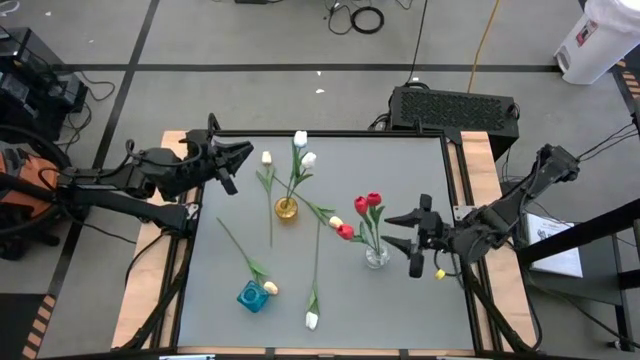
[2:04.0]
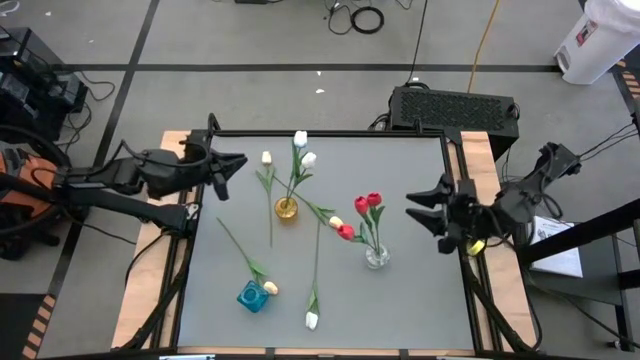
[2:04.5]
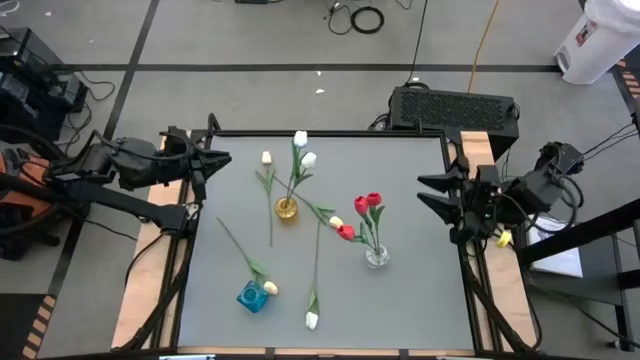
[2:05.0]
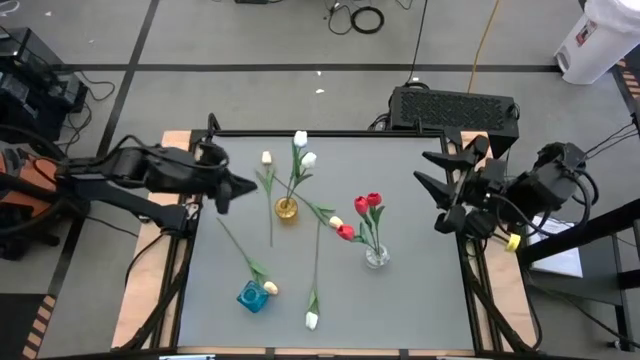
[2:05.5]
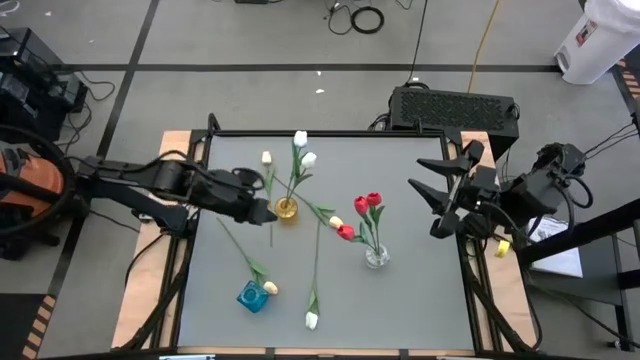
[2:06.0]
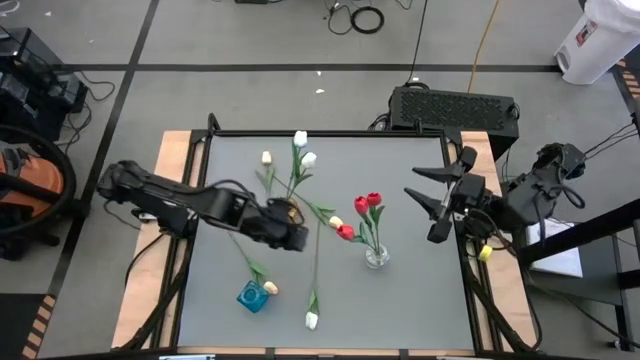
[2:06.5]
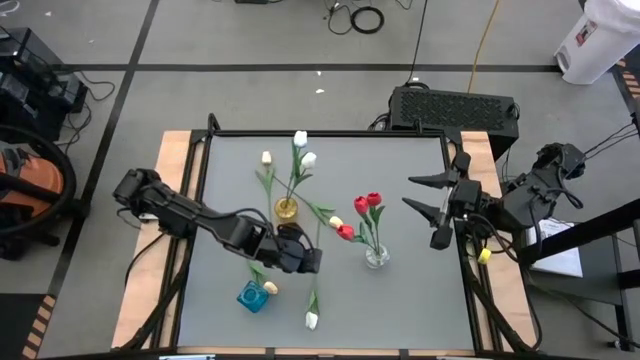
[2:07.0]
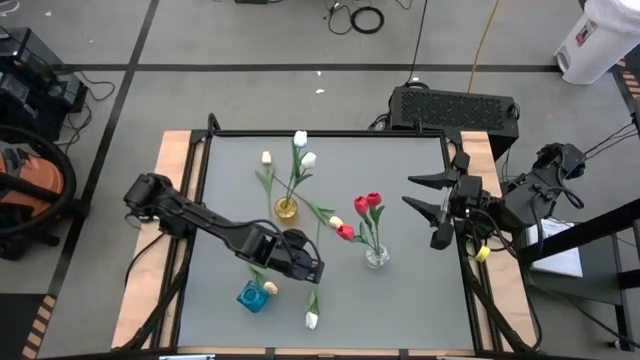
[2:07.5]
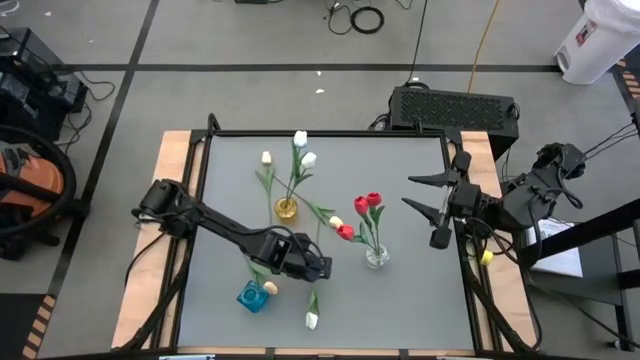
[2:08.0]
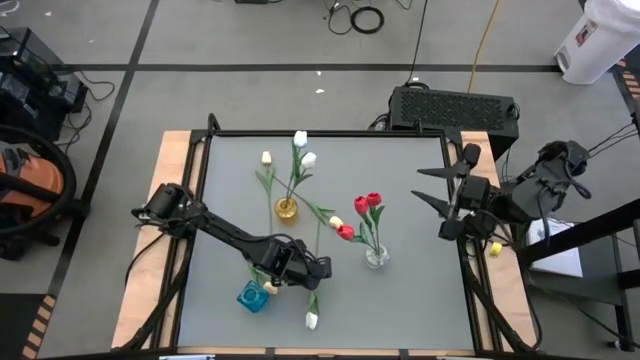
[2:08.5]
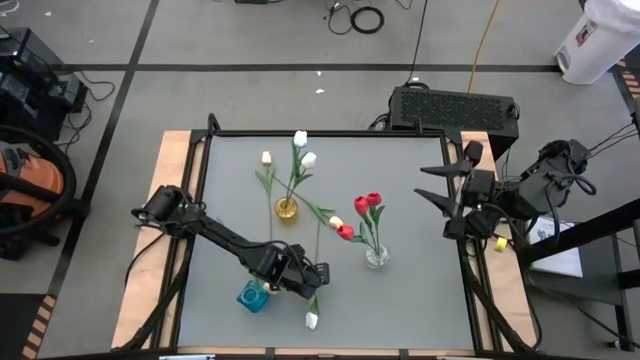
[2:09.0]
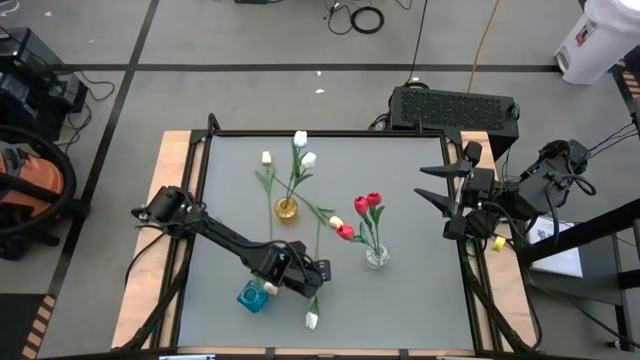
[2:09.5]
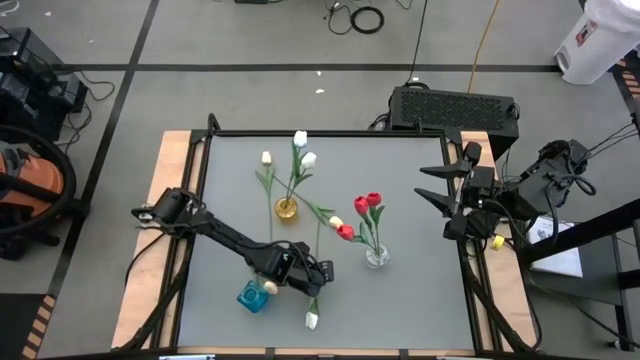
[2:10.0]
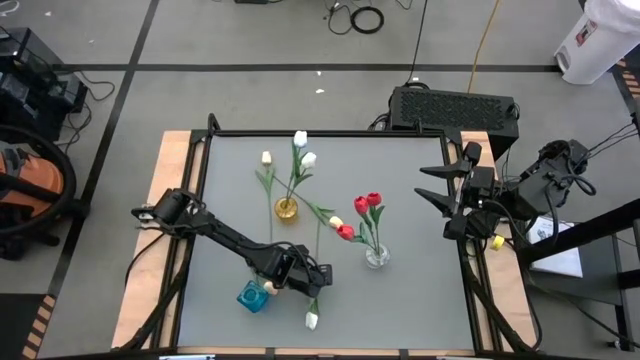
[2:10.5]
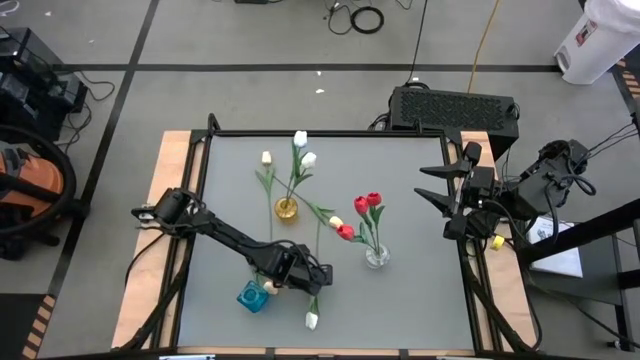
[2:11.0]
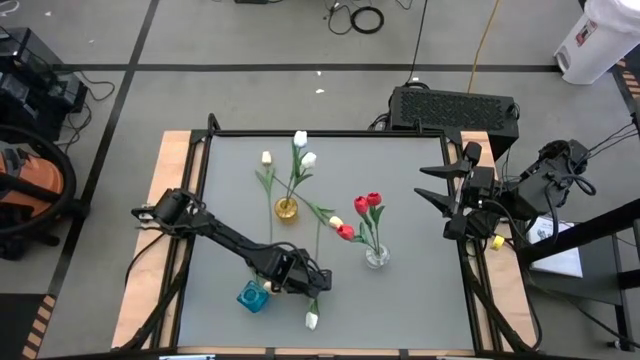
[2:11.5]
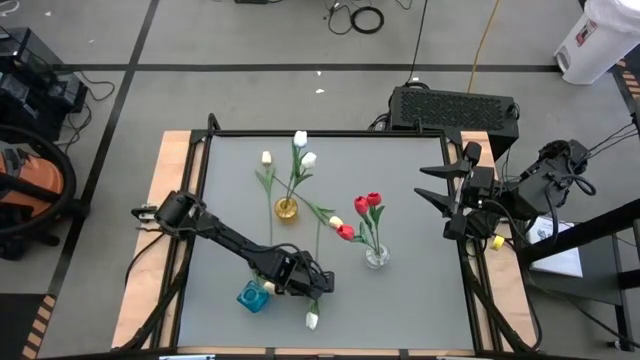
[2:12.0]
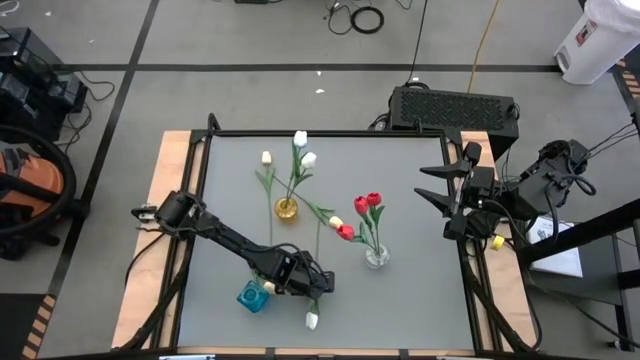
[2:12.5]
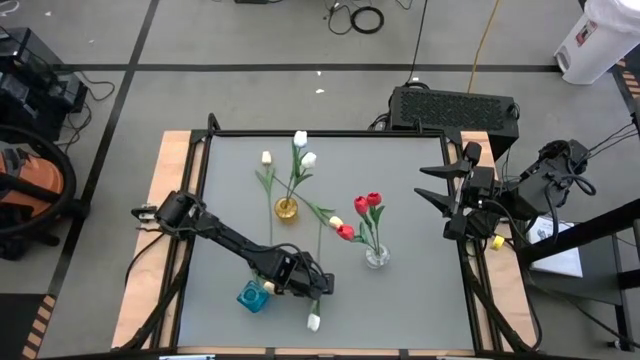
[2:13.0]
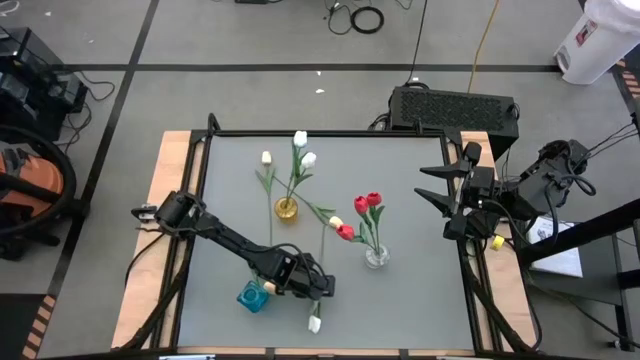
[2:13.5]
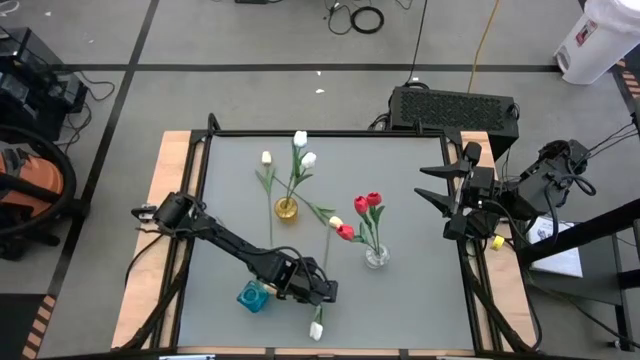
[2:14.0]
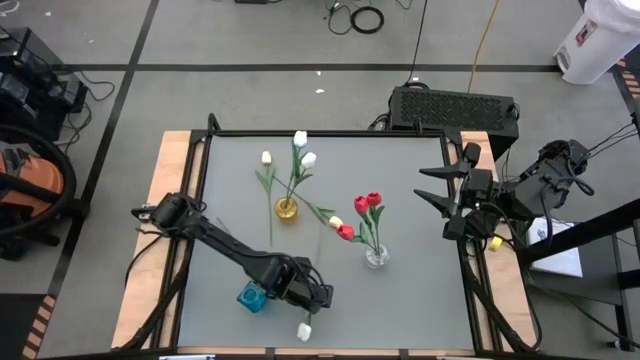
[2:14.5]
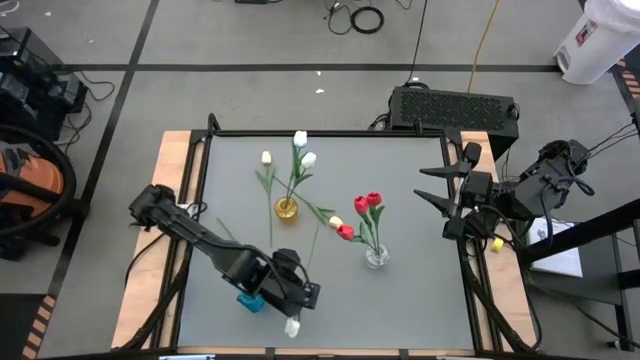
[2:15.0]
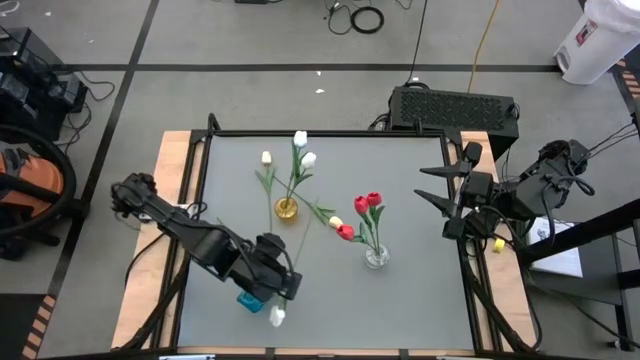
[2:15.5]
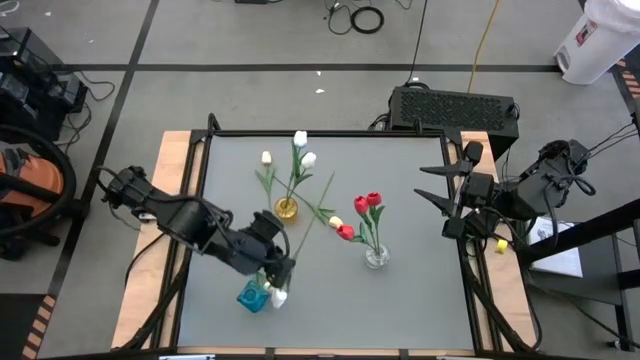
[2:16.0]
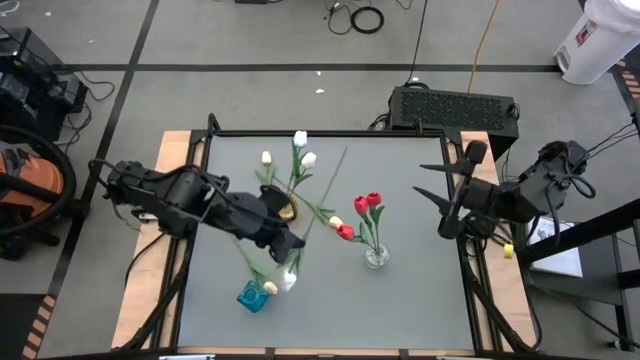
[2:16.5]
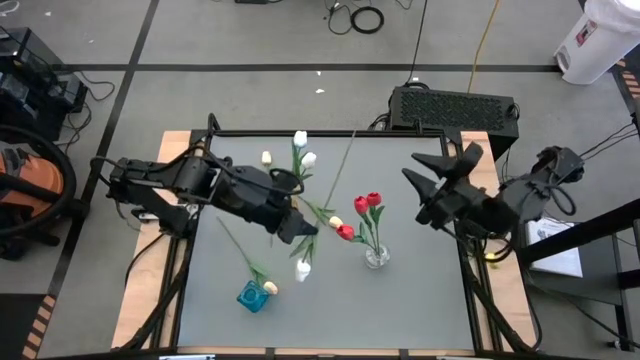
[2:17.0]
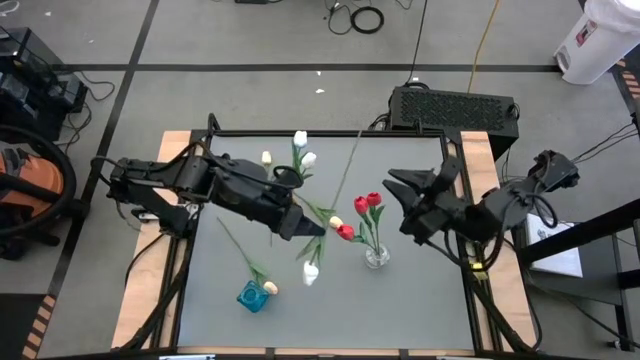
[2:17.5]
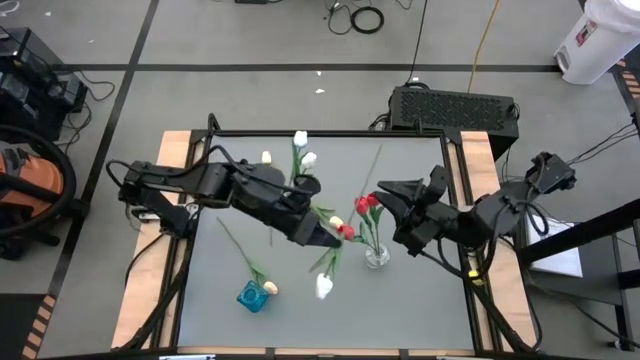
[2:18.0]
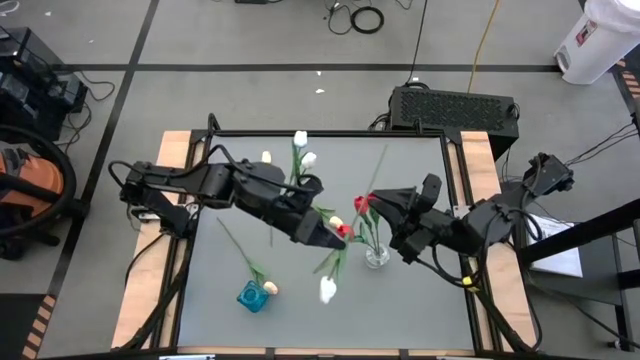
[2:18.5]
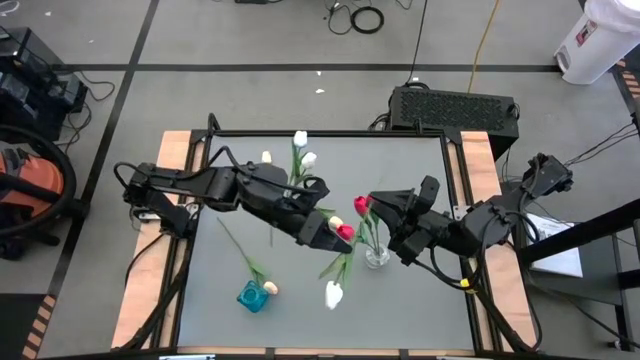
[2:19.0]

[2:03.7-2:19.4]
Task: Sort flowers into vase by color
Put the white tulip into the yellow vase

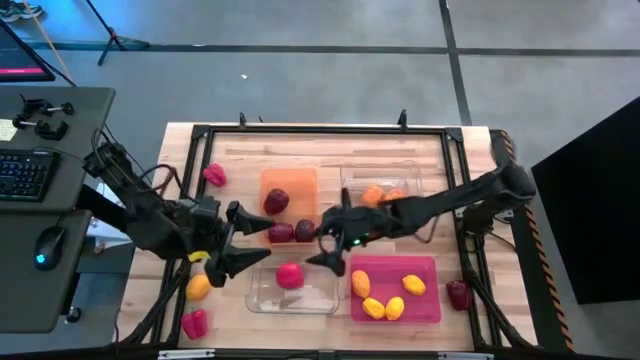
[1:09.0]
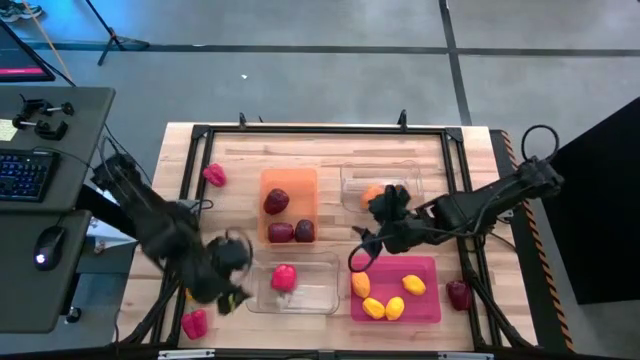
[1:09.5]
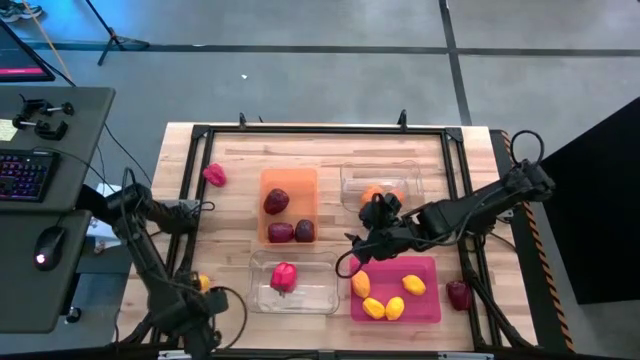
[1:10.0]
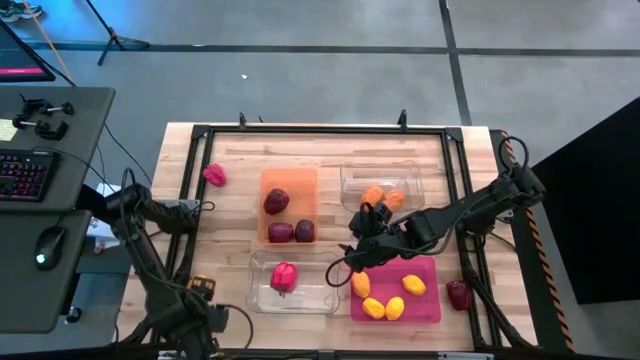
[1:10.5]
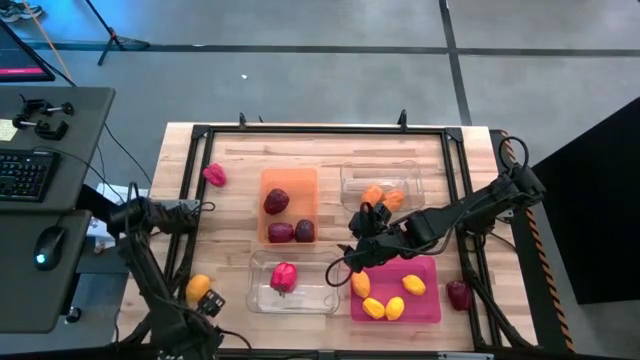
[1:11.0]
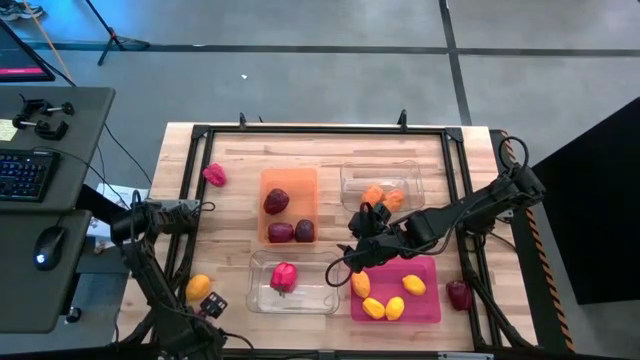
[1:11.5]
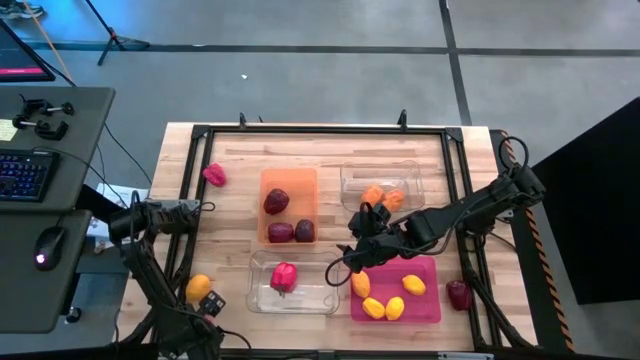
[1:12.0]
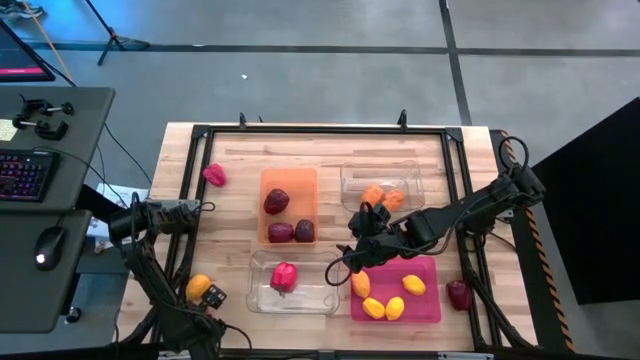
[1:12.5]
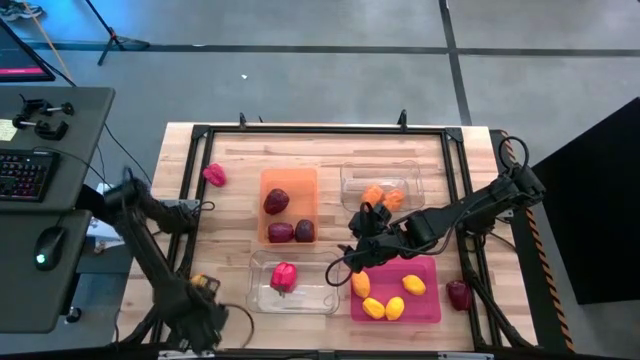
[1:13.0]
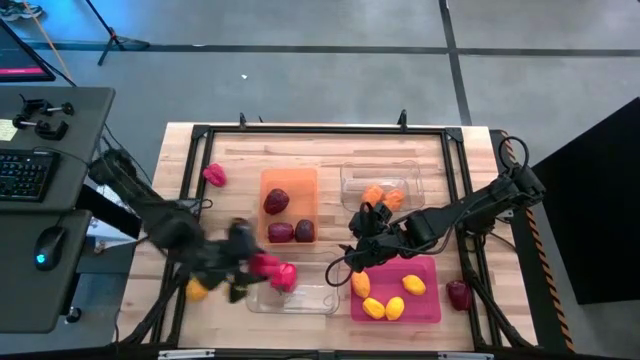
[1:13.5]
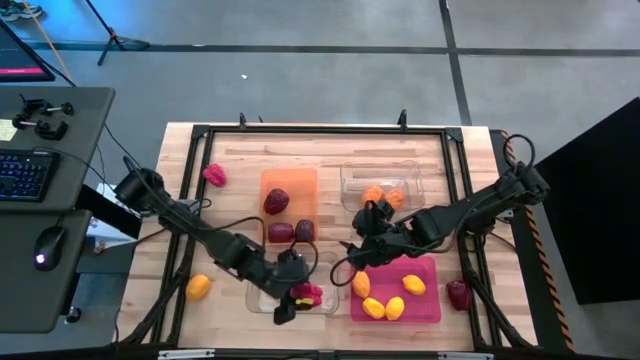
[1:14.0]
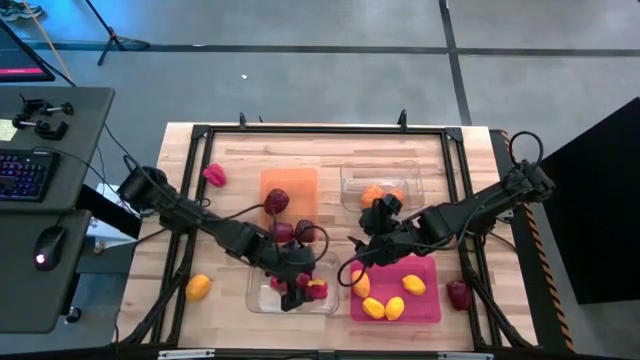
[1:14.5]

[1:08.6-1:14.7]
Task: Sort produce into baskets
Put the bottom red bell pepper into the bottom transparent bin
